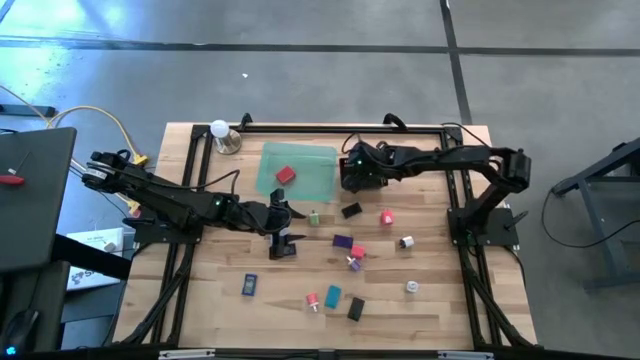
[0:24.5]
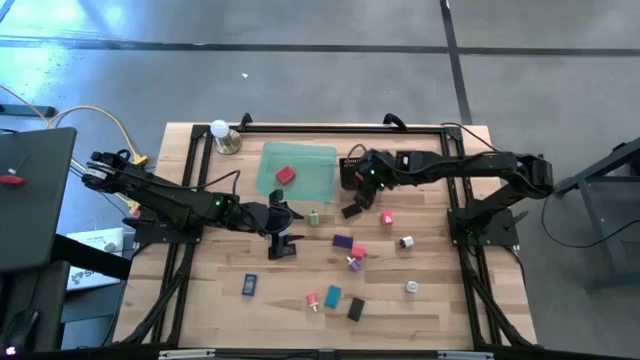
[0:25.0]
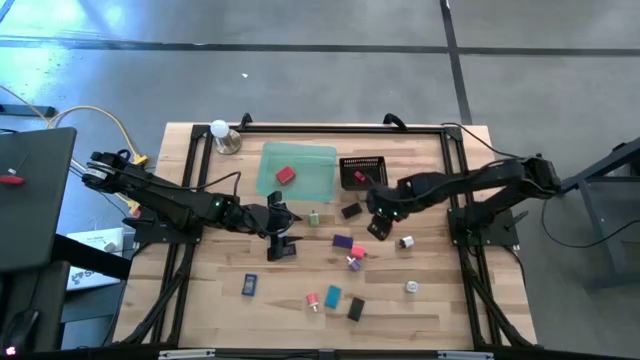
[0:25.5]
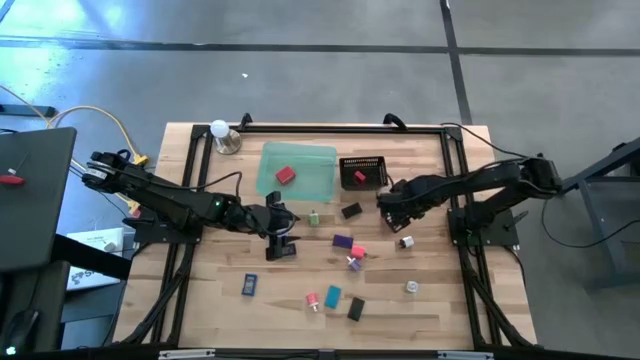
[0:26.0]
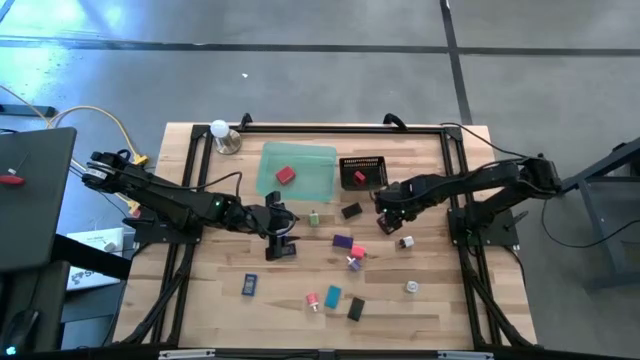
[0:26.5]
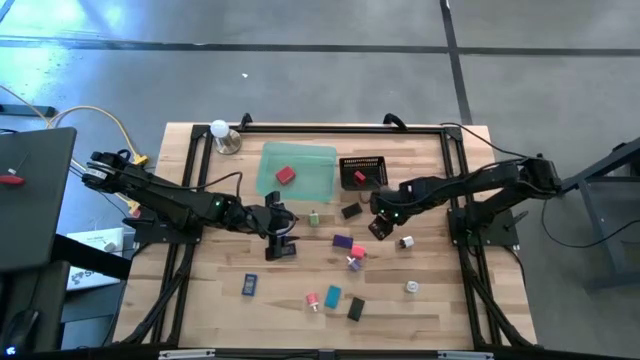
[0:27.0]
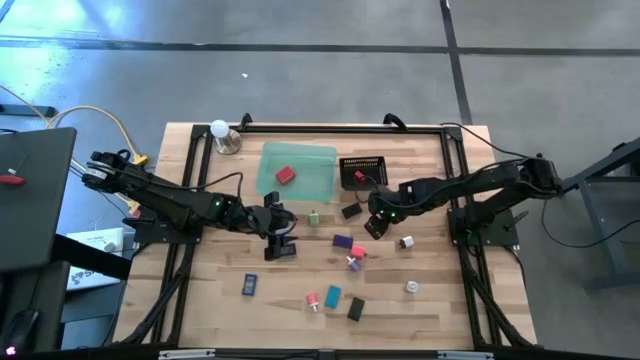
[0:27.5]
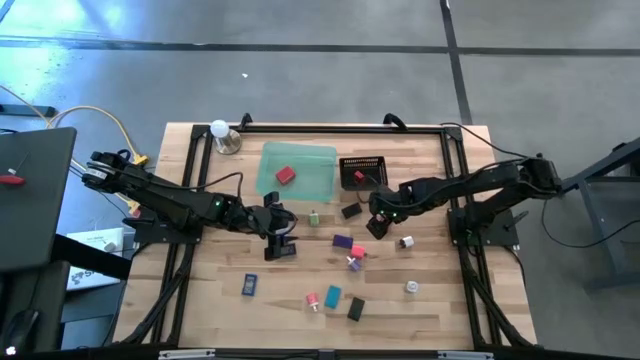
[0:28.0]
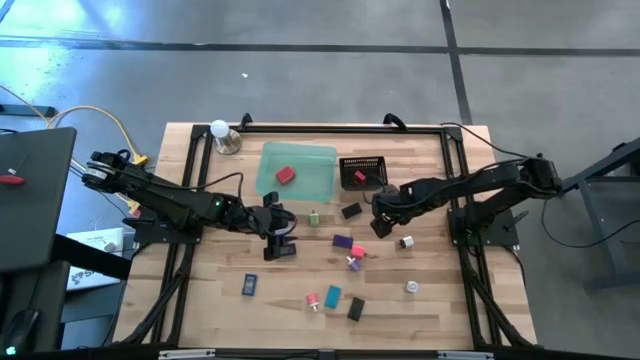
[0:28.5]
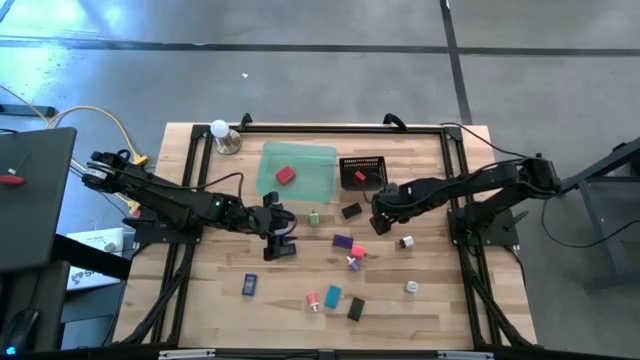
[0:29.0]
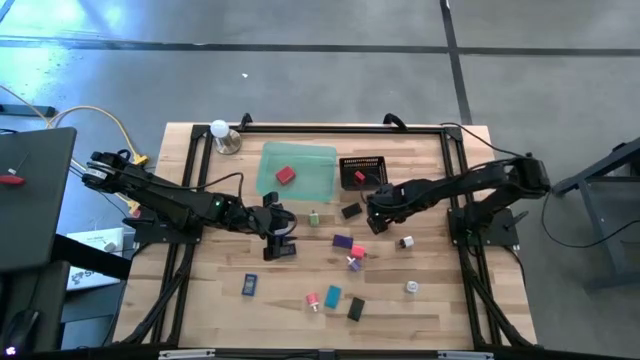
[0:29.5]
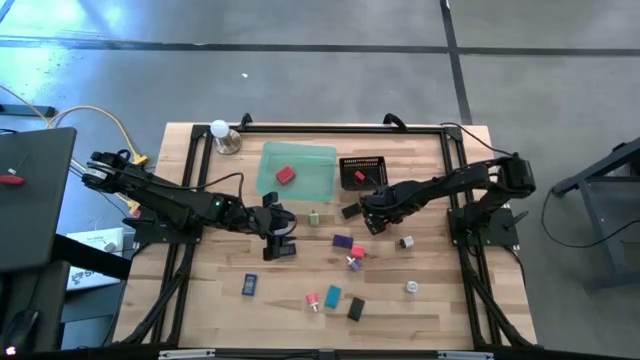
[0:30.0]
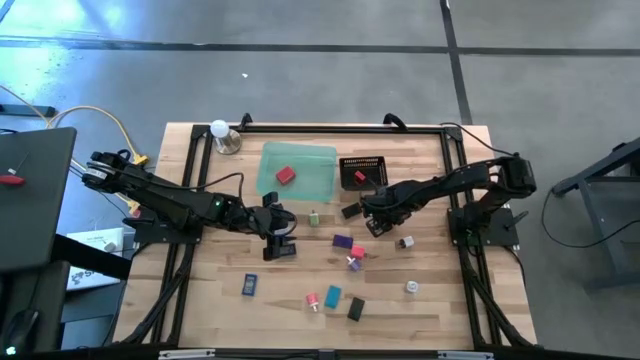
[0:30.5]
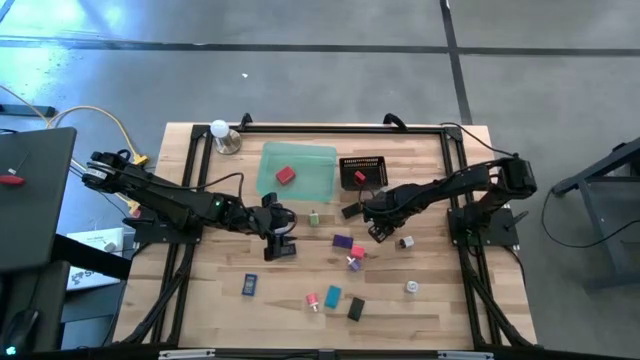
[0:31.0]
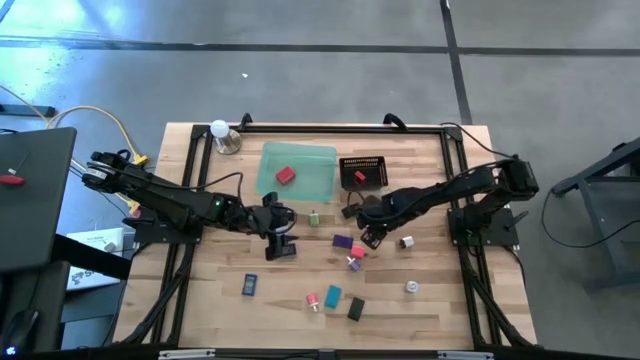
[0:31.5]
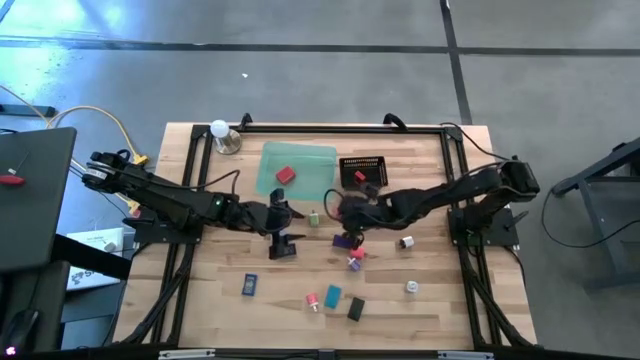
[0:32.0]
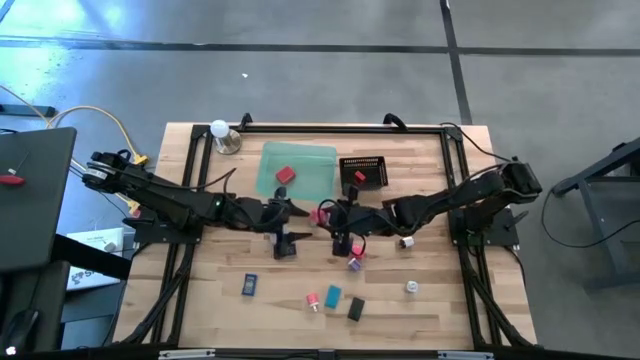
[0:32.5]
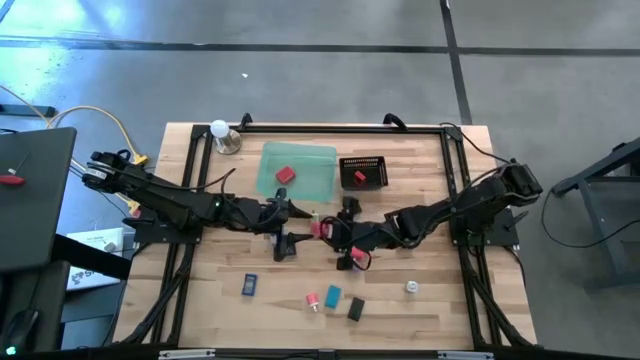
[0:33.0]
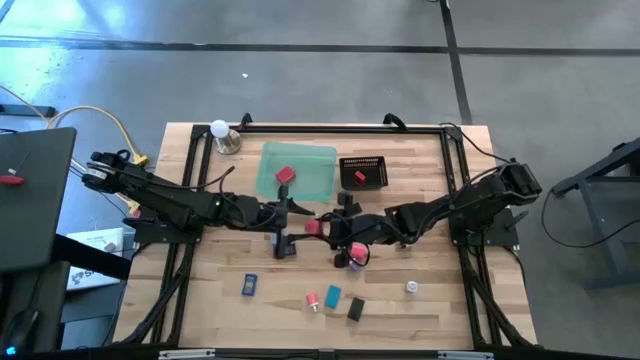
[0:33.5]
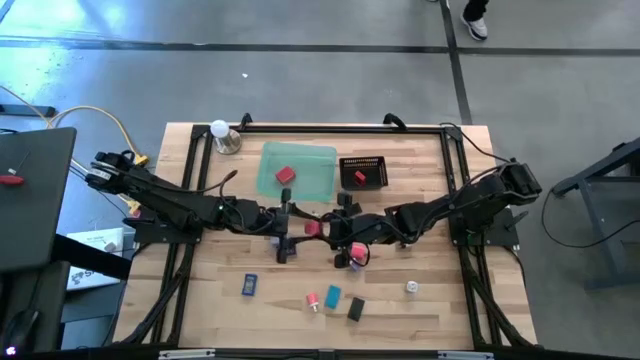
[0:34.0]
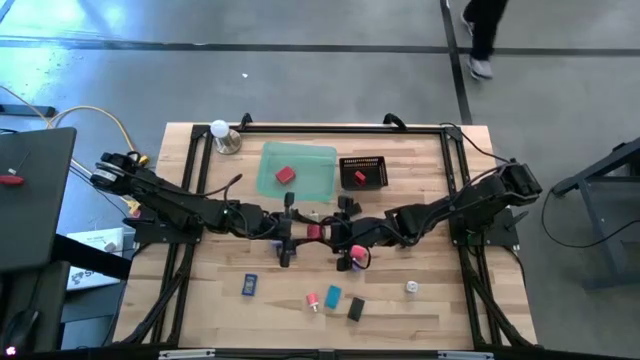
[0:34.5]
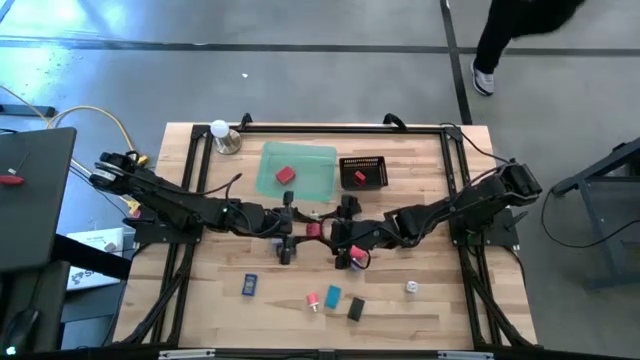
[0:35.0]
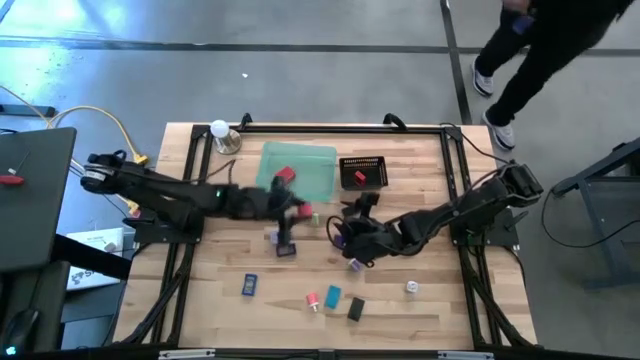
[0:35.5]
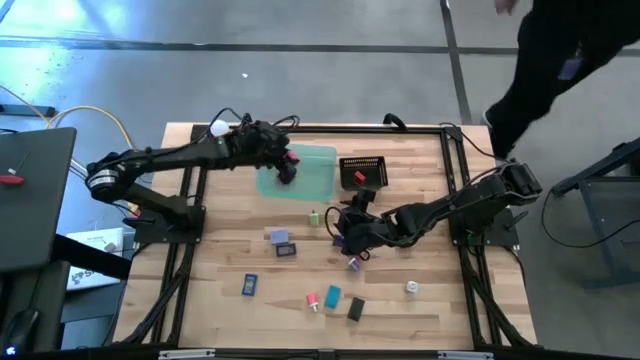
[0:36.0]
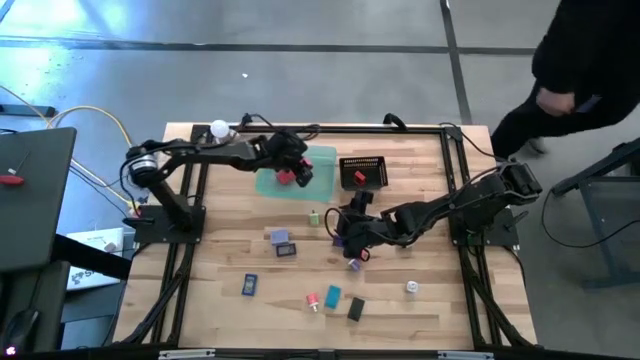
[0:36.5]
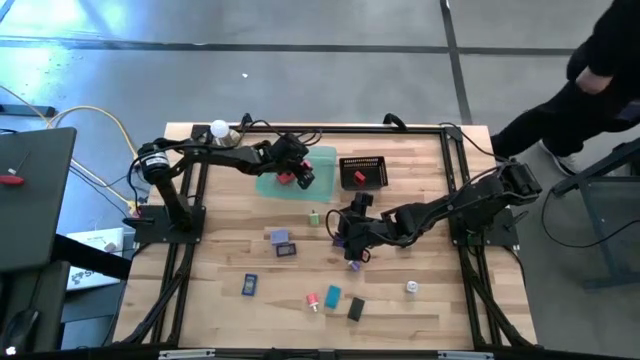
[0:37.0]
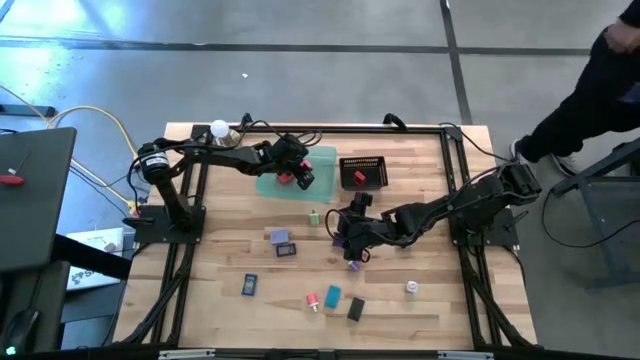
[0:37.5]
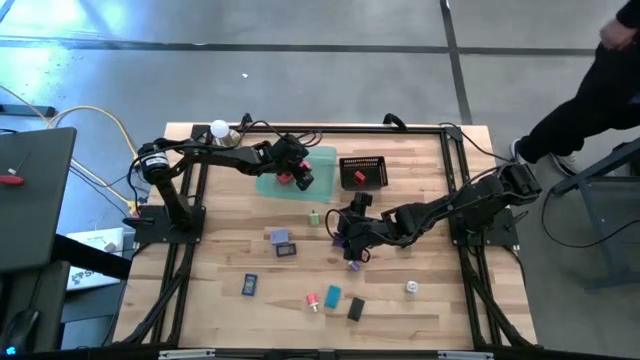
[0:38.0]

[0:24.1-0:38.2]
Task: Pick & Place Office items
Put the top pink charger adapter into the green bin

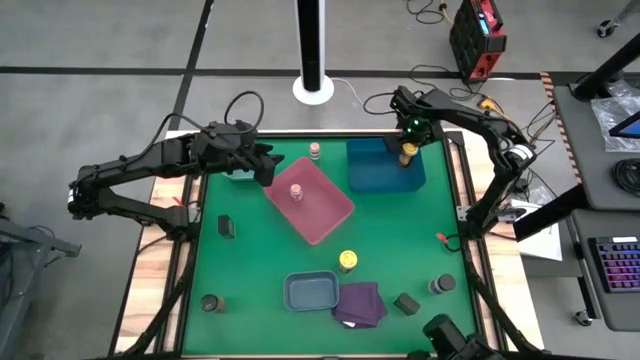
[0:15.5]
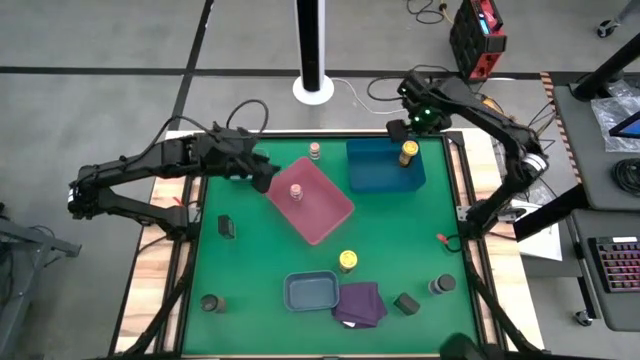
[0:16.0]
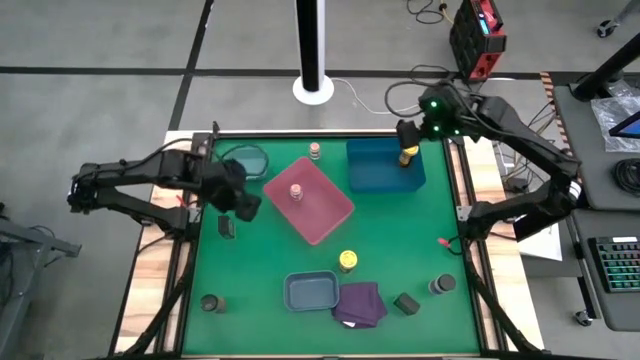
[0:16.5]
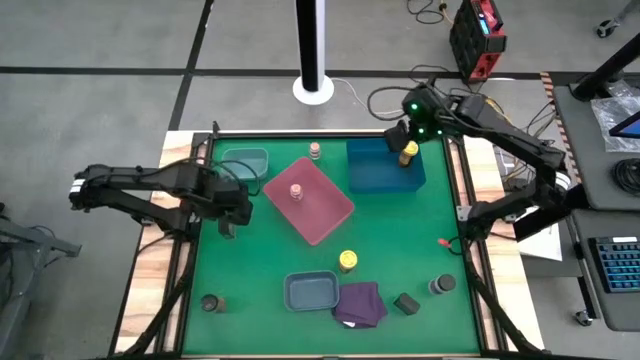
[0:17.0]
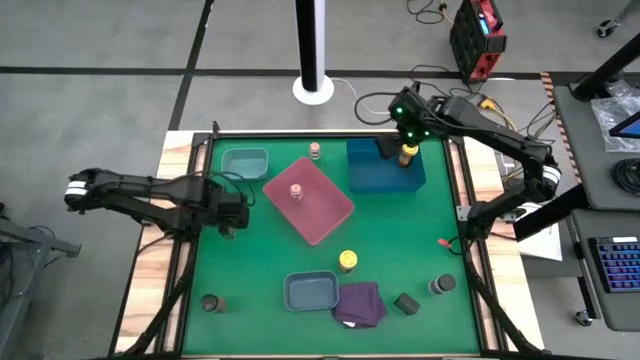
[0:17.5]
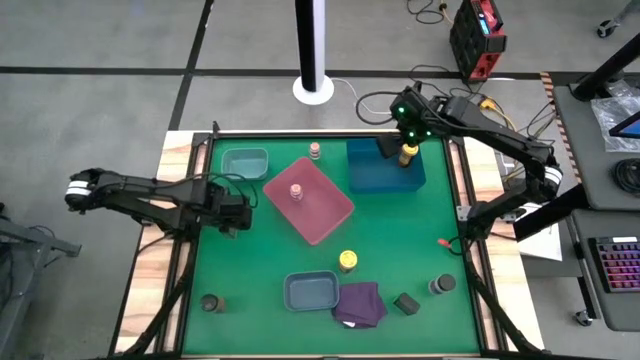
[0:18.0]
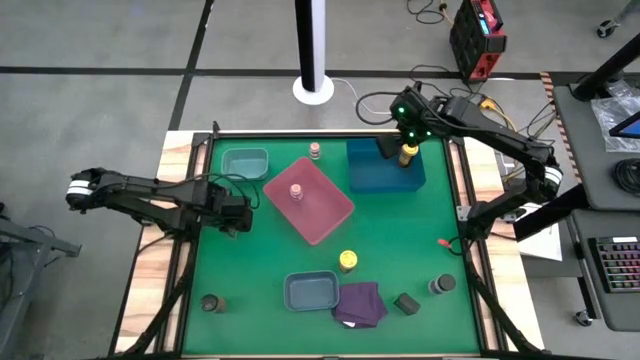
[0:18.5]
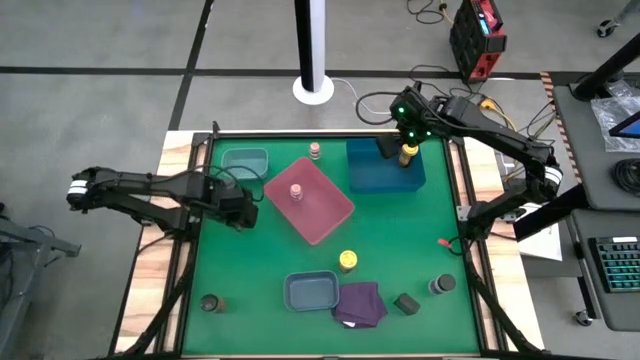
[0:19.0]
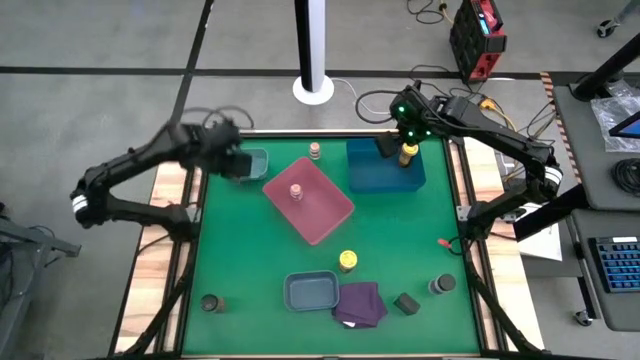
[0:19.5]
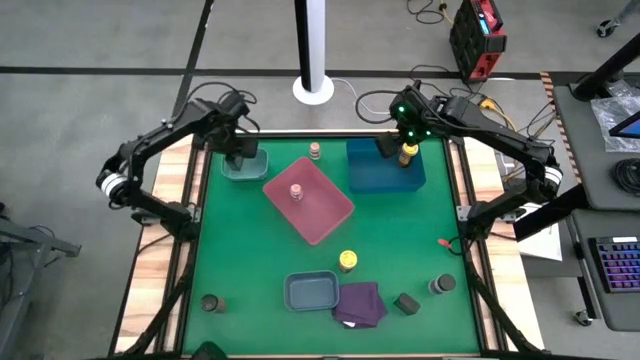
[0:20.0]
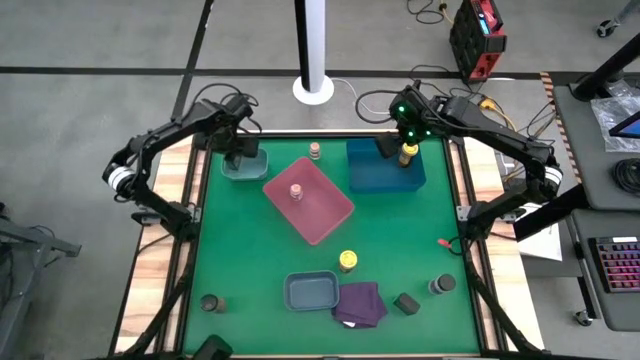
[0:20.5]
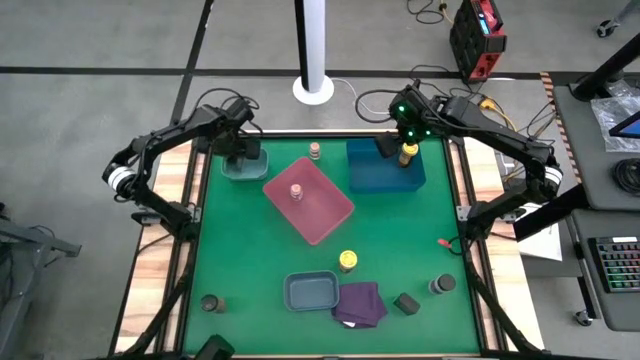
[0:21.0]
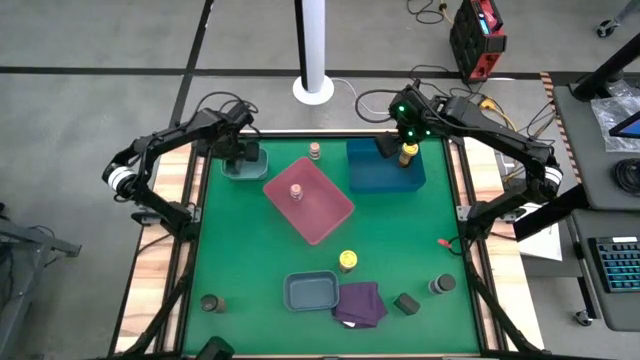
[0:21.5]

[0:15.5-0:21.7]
Task: Sort spices by type
Put the top green seasoning can into the green bin
